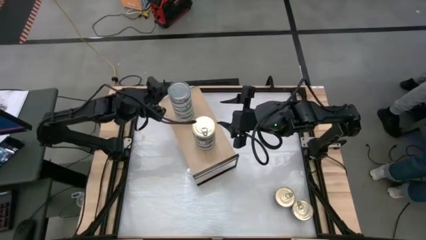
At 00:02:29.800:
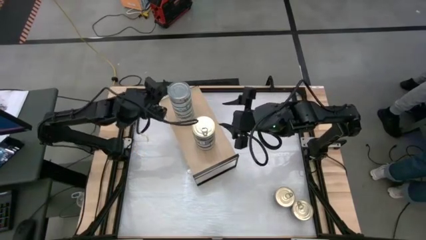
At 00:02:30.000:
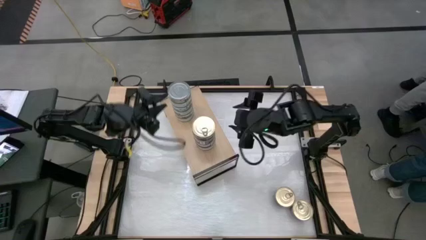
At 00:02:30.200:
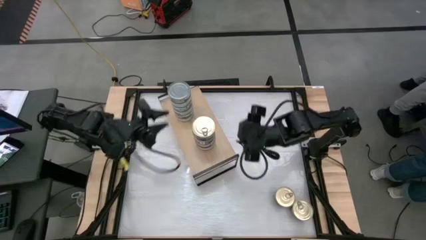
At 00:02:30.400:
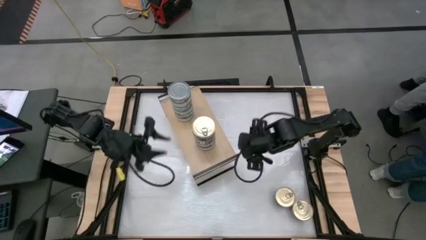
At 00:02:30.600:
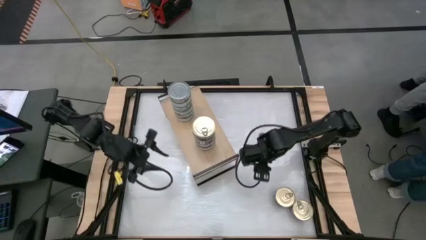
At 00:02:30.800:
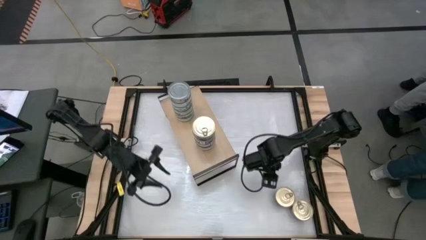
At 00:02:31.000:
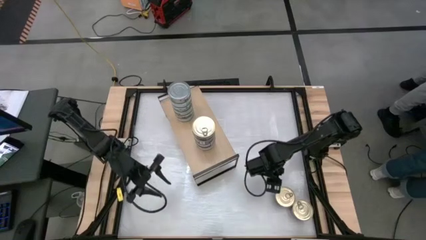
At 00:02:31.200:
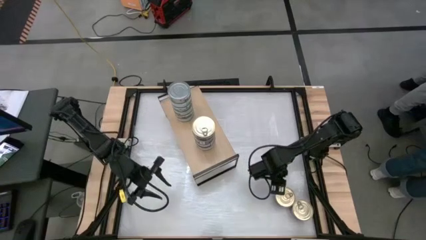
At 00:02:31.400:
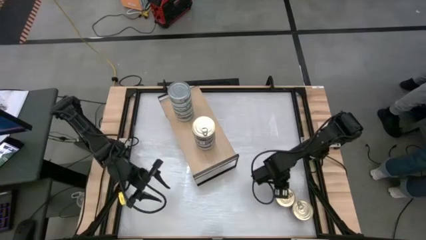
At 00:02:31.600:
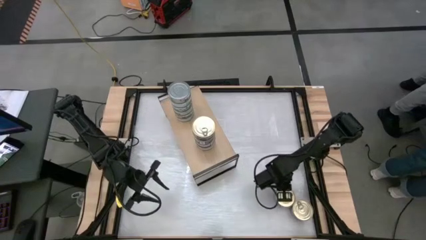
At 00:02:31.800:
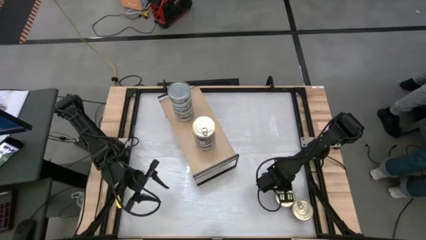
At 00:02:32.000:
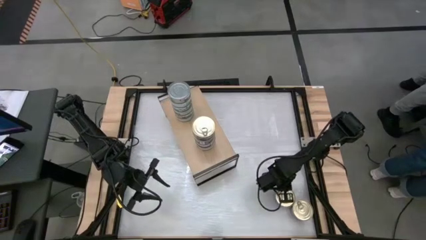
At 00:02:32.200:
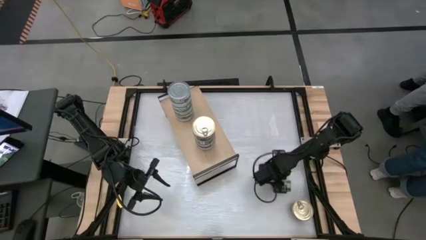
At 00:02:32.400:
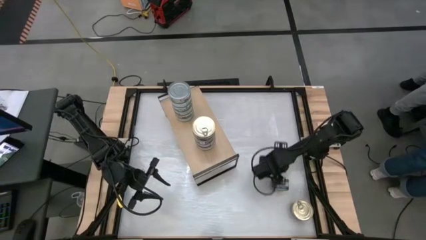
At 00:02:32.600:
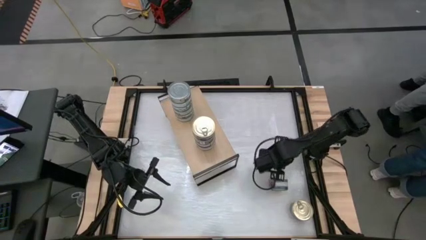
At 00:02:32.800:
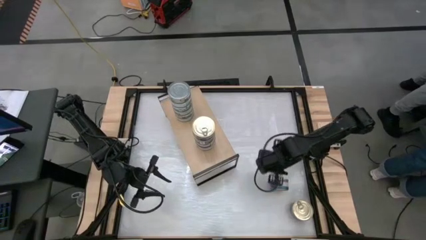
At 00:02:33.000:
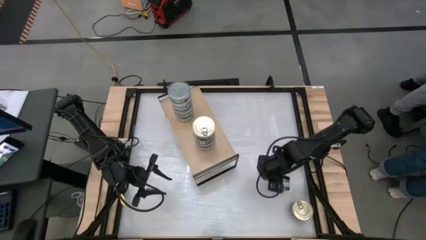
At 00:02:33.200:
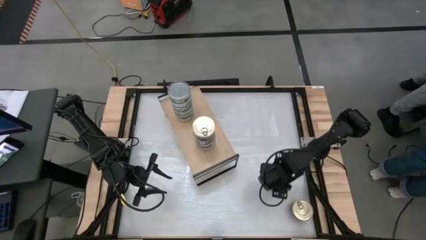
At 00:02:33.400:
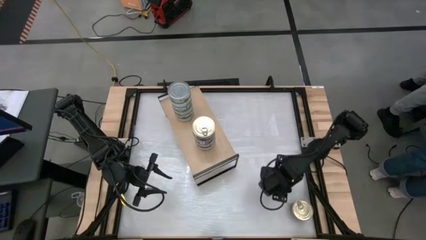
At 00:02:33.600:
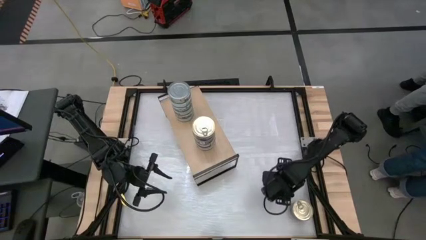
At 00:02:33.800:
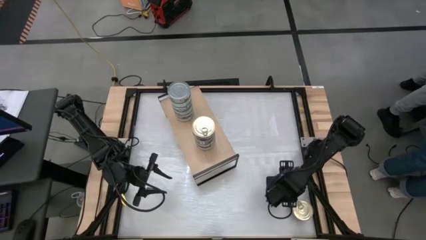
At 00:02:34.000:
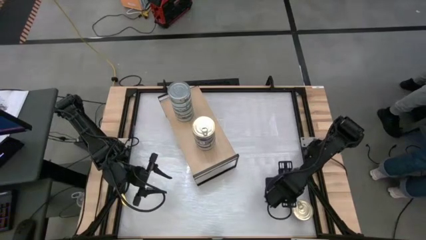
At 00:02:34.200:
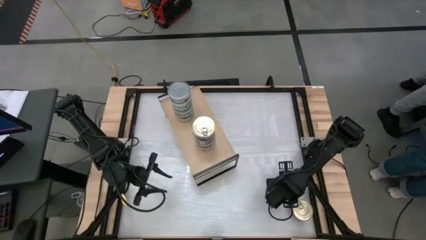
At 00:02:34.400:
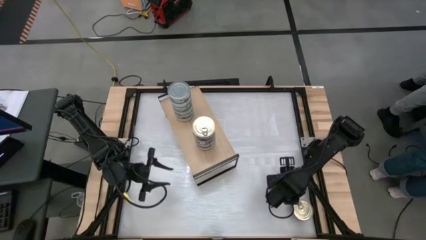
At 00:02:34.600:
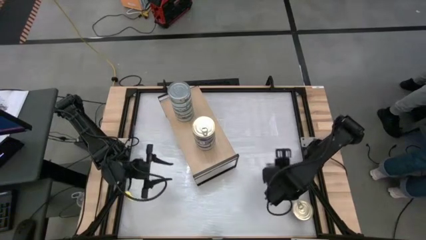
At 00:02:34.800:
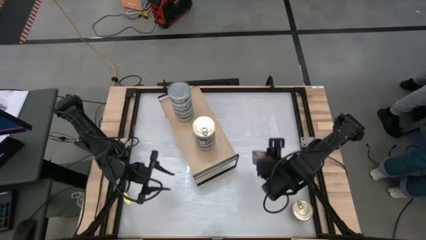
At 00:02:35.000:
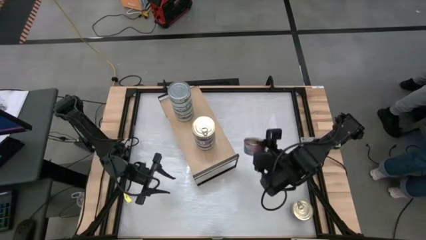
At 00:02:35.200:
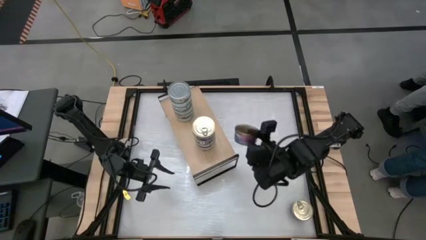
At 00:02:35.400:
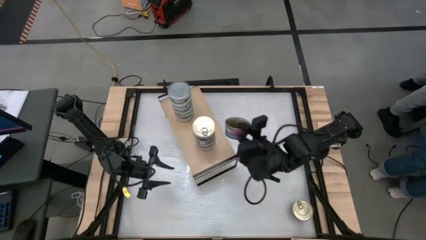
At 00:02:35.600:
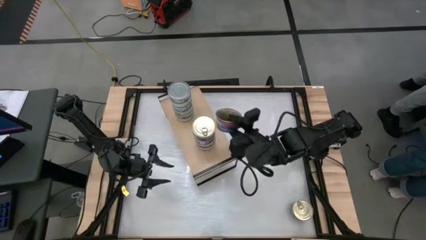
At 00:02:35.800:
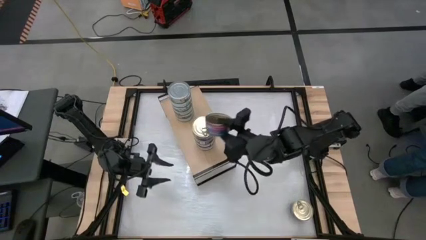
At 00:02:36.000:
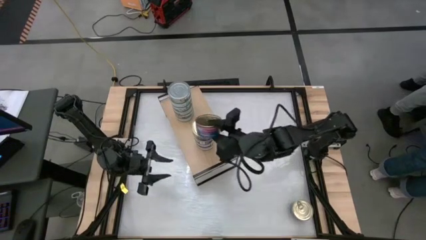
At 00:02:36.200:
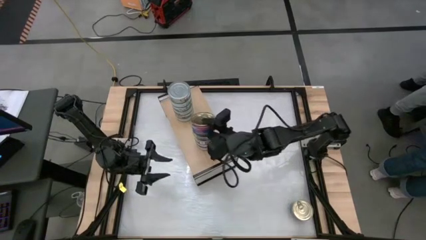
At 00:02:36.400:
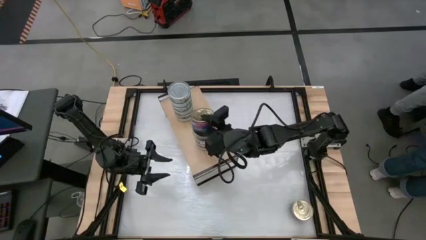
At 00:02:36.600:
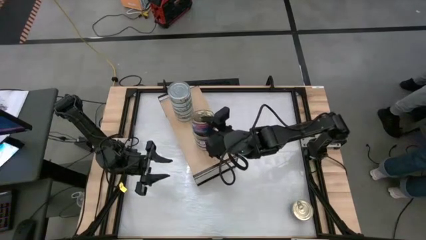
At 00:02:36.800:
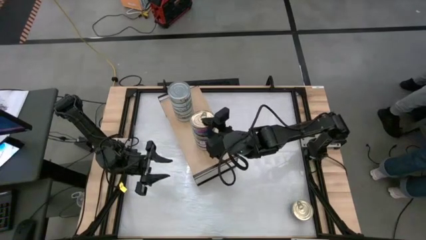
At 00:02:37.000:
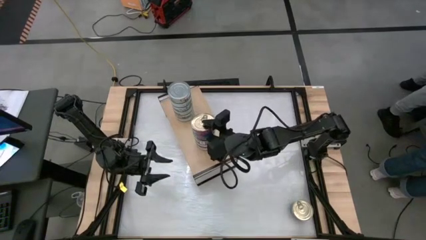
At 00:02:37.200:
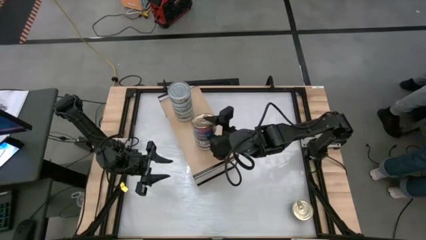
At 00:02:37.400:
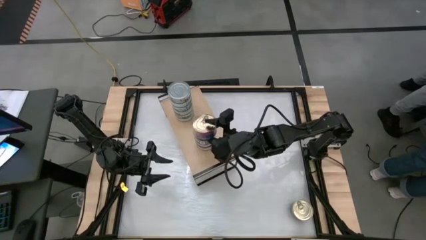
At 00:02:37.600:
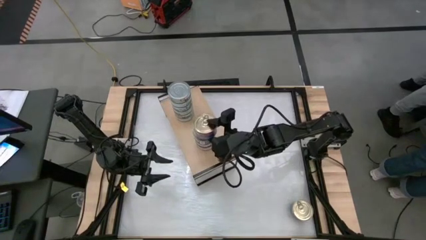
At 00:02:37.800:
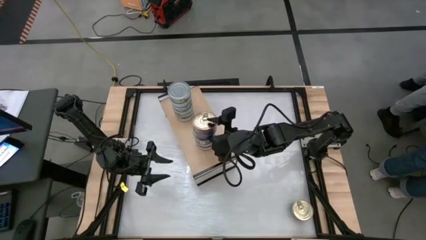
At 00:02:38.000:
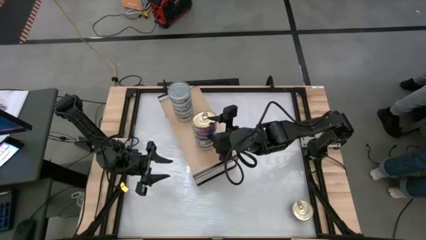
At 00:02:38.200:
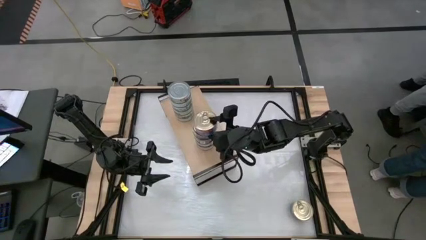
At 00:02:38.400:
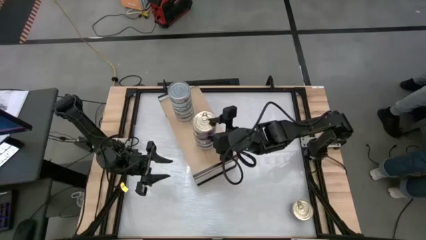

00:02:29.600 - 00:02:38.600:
Task: Stack canned seafood by type on shelf
Stack the blue tuna can on top of the other blue tuna can on the shelf

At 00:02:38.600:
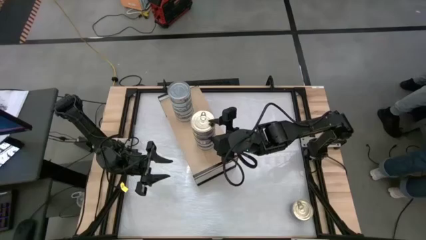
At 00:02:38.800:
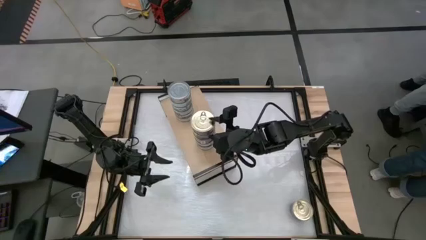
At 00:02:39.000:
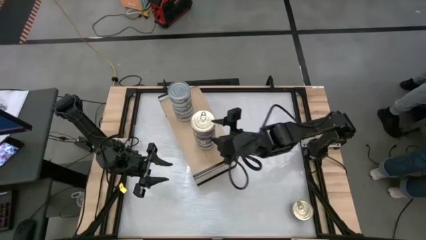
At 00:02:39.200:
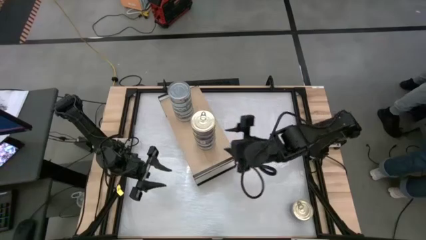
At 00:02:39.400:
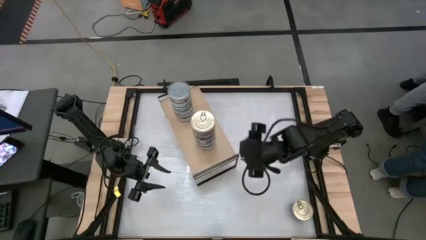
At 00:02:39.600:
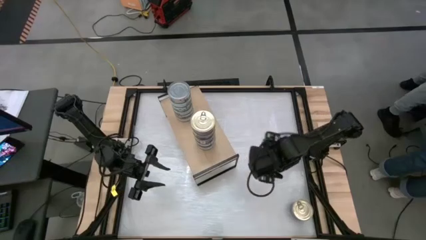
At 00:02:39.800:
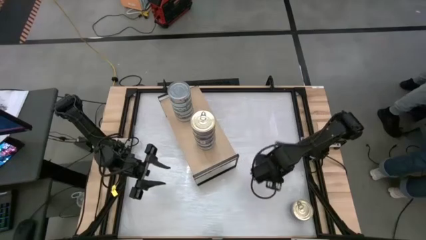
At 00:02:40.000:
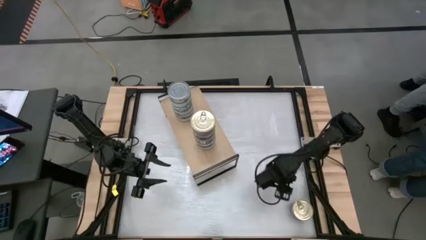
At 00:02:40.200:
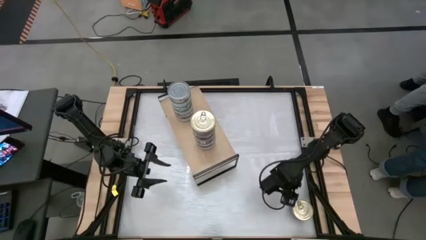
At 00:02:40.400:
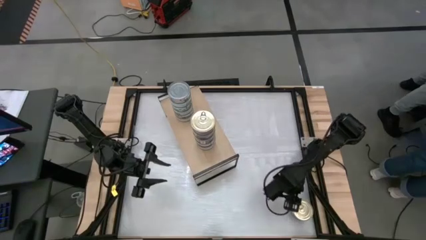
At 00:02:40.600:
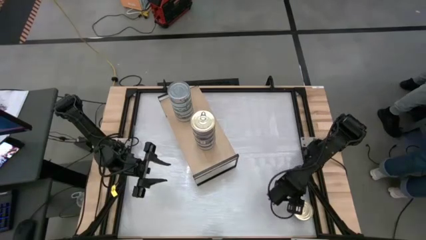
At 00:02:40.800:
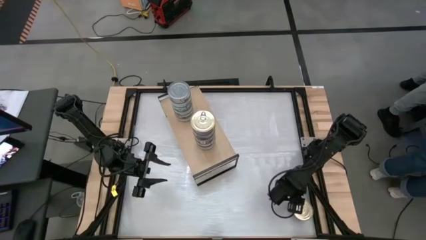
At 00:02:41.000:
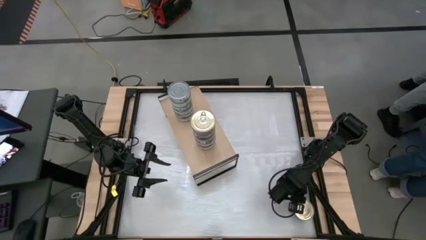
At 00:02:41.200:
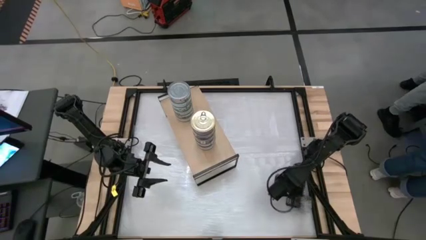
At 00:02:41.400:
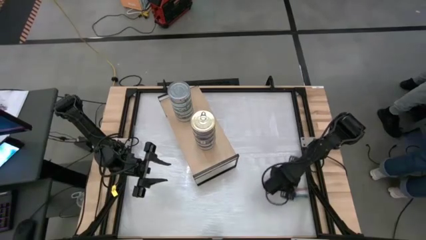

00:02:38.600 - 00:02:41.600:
Stack the blue tuna can on top of the other blue tuna can on the shelf

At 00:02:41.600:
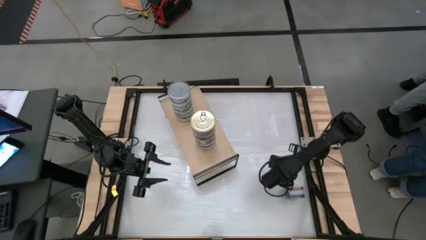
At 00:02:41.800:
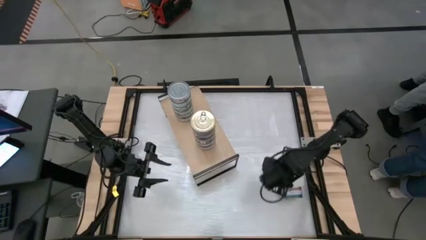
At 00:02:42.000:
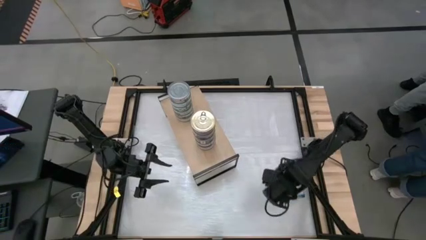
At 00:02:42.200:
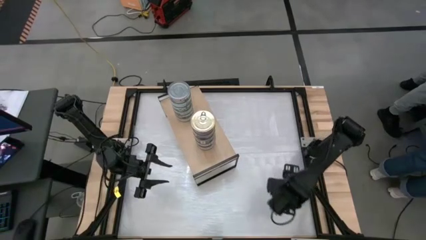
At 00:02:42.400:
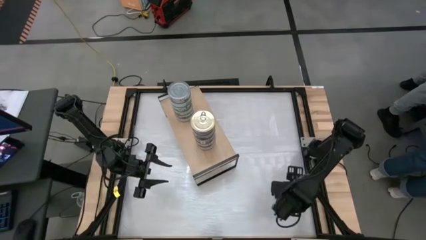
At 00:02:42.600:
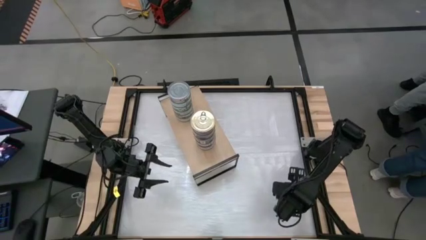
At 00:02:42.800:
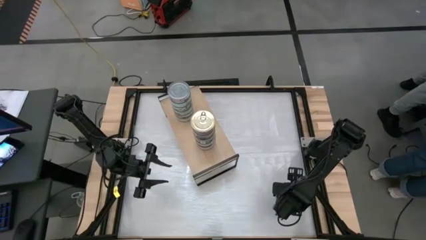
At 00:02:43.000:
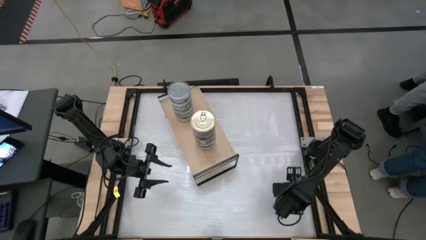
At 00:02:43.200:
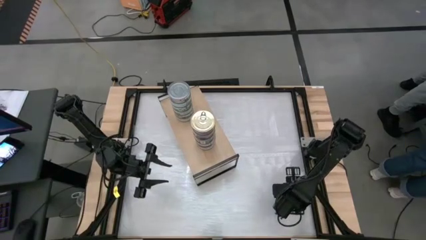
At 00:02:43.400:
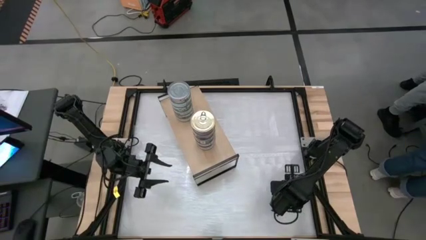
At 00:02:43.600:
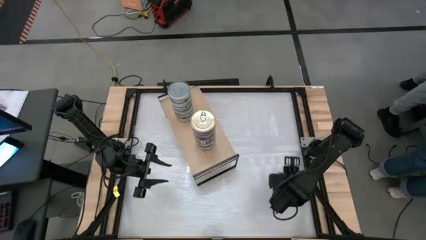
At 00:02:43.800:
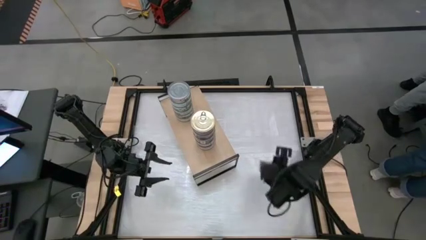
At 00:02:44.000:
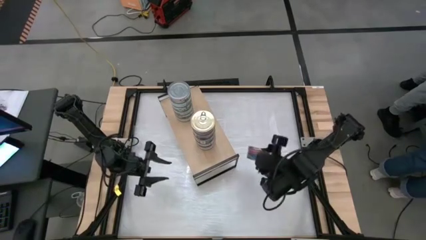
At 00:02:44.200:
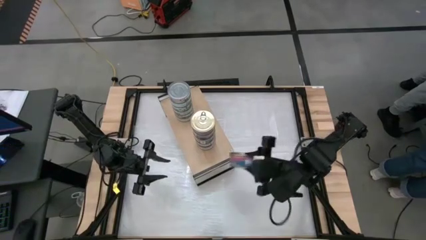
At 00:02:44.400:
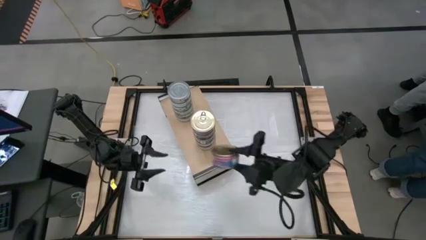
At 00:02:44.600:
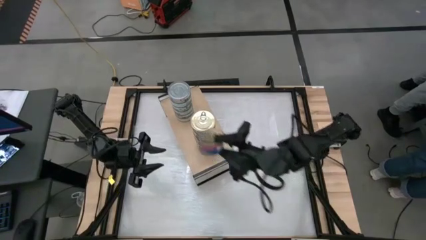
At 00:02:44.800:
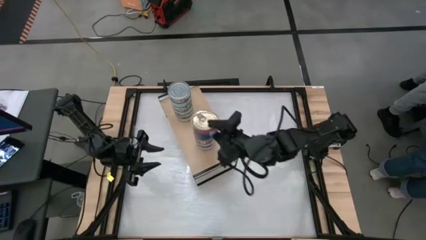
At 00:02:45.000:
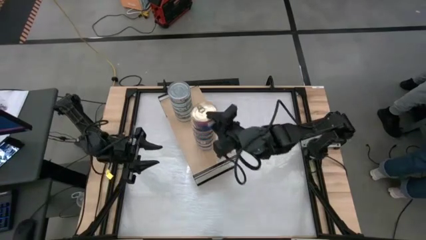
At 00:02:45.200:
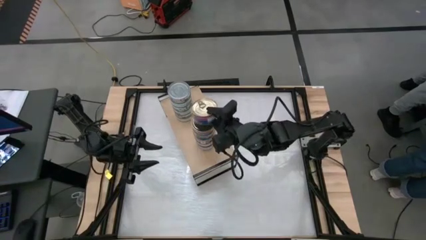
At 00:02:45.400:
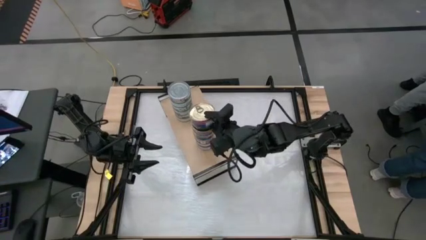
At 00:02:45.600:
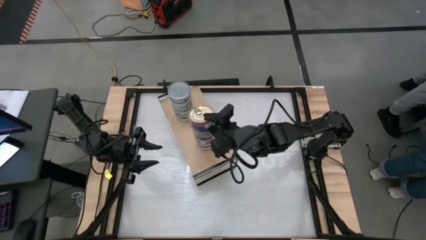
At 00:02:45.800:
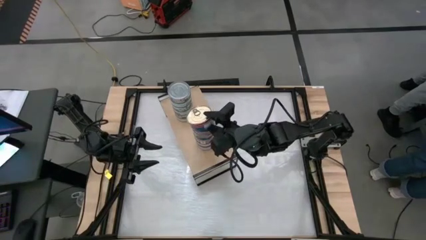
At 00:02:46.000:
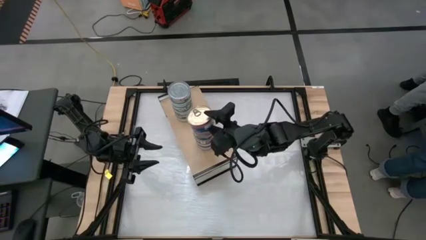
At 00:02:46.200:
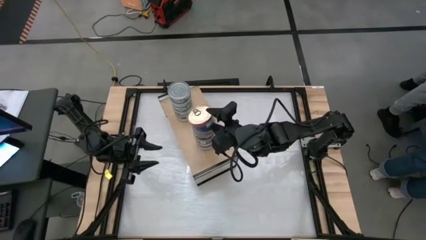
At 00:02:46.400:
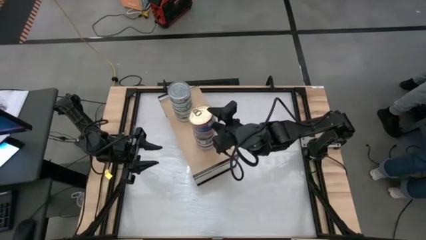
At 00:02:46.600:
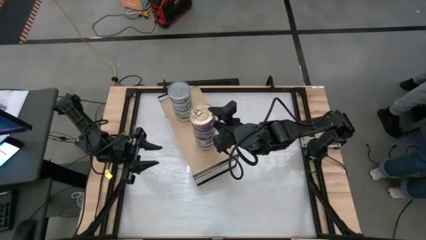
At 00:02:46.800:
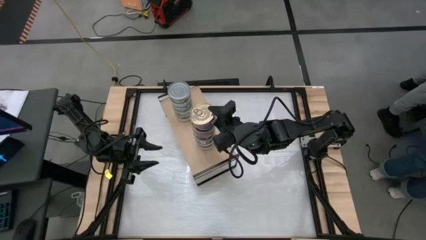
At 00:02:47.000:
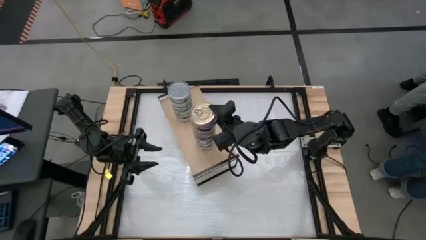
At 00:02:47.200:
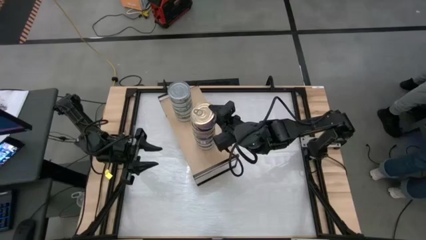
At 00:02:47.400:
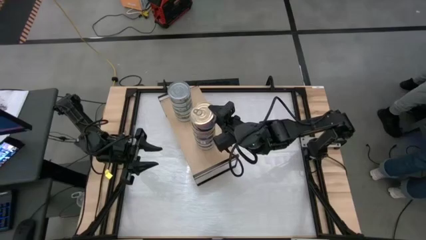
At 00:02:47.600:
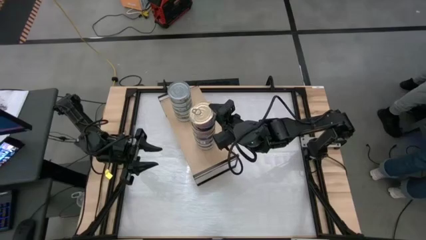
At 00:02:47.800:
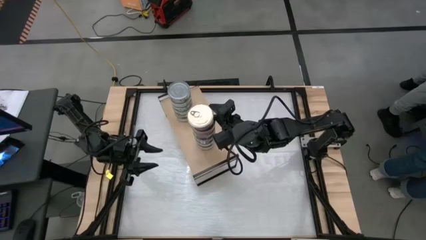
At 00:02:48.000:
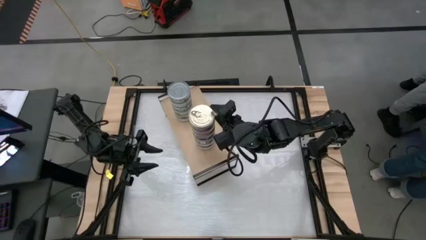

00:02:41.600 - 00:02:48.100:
Stack the blue tuna can on top of the other blue tuna can on the shelf
